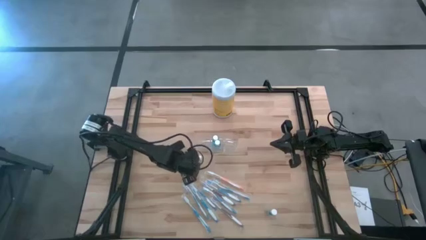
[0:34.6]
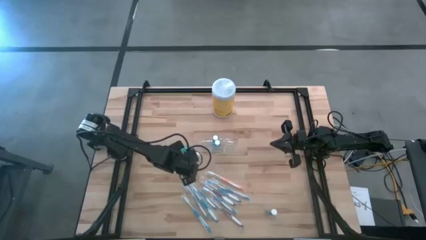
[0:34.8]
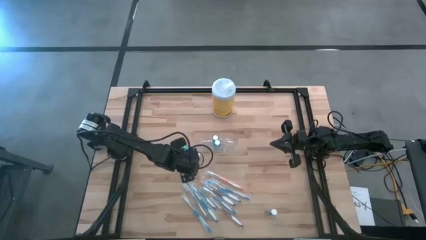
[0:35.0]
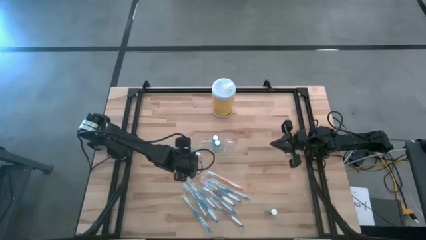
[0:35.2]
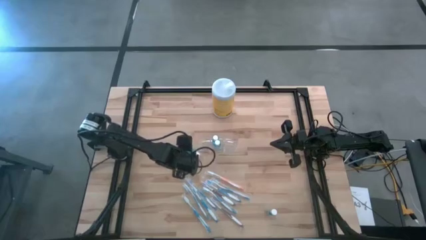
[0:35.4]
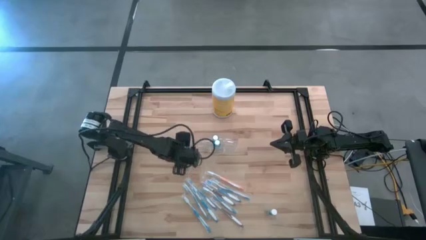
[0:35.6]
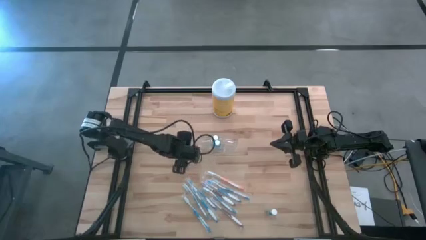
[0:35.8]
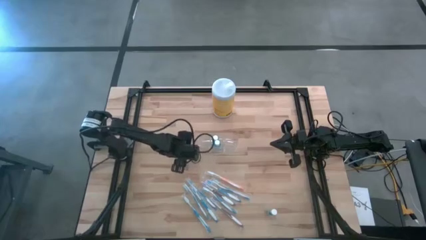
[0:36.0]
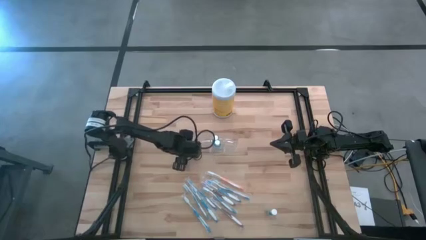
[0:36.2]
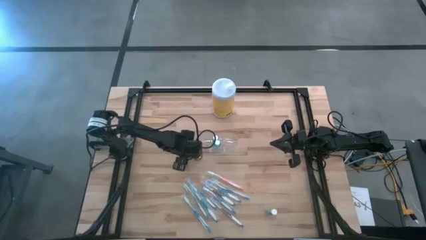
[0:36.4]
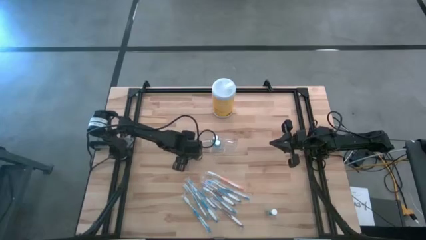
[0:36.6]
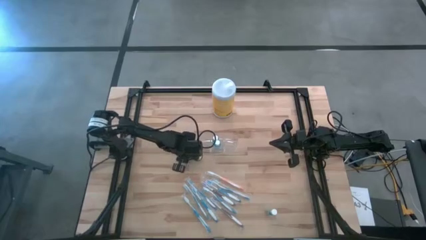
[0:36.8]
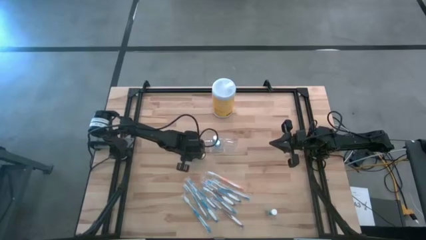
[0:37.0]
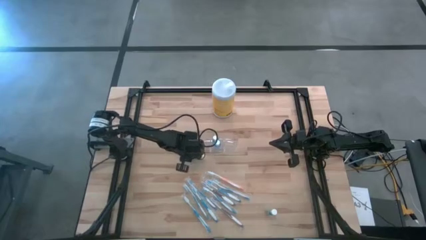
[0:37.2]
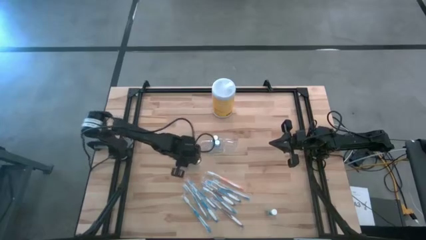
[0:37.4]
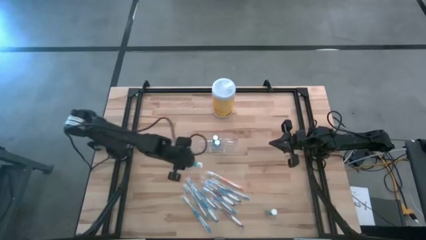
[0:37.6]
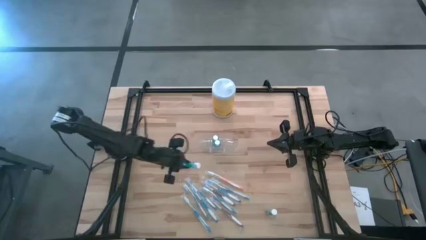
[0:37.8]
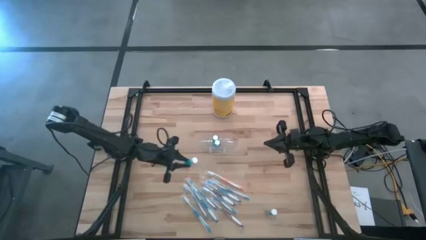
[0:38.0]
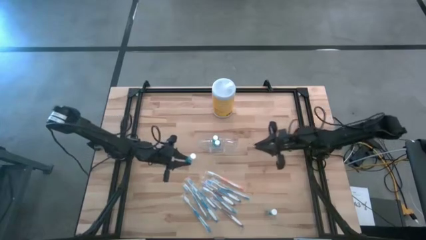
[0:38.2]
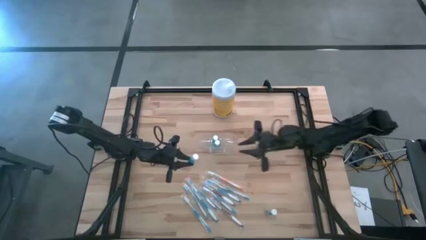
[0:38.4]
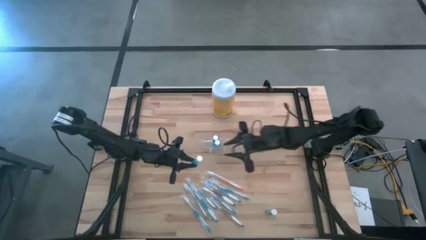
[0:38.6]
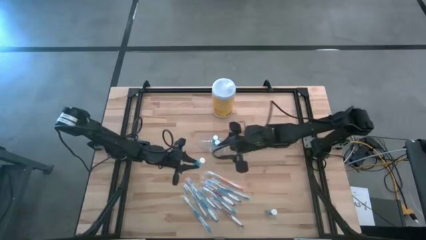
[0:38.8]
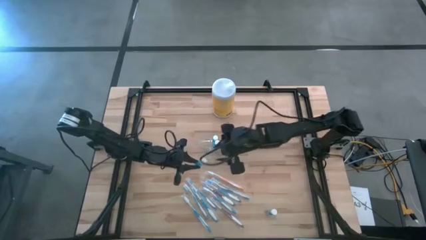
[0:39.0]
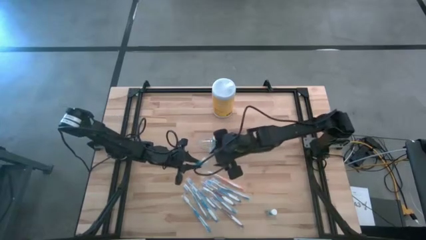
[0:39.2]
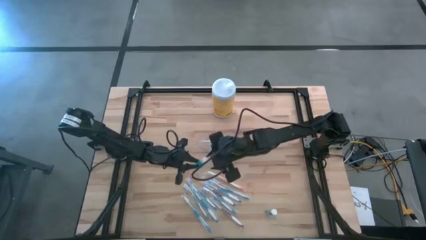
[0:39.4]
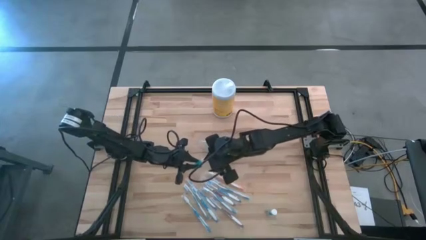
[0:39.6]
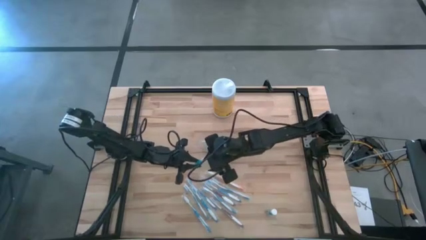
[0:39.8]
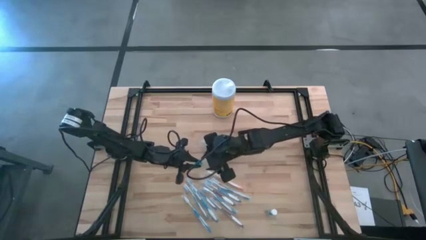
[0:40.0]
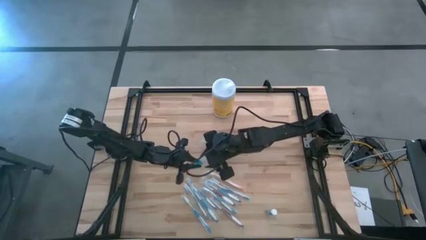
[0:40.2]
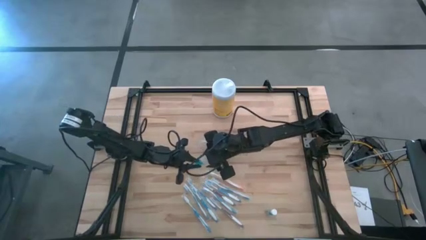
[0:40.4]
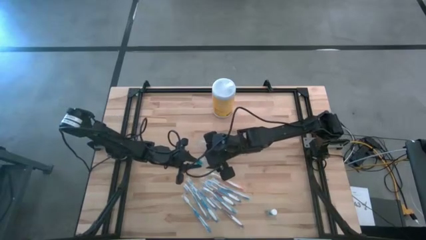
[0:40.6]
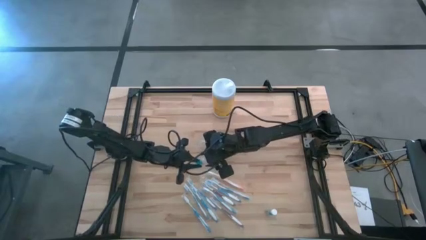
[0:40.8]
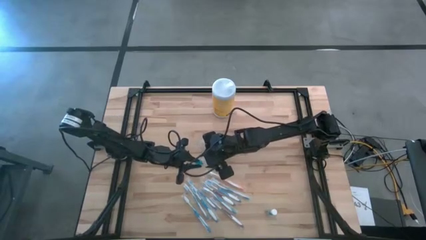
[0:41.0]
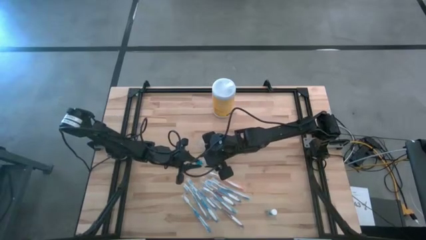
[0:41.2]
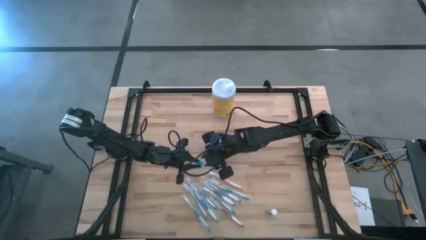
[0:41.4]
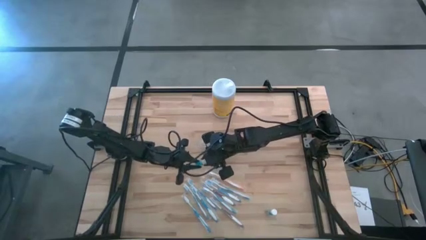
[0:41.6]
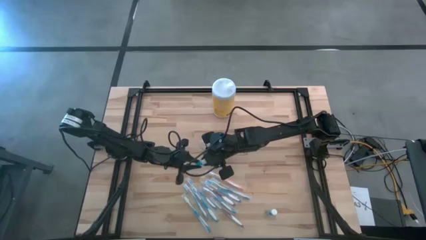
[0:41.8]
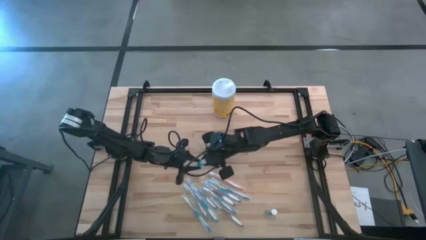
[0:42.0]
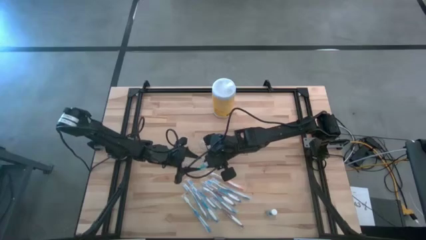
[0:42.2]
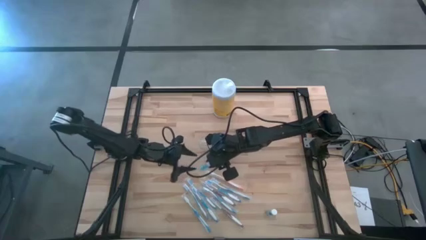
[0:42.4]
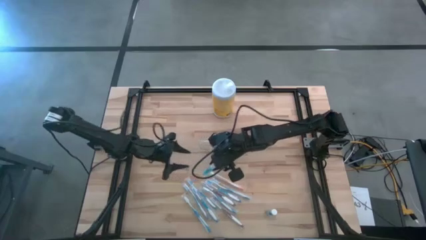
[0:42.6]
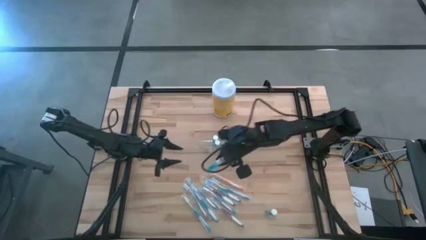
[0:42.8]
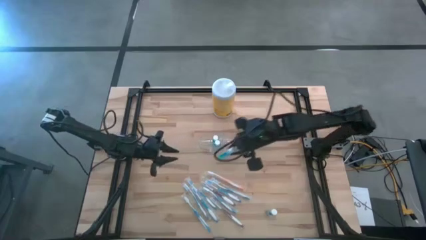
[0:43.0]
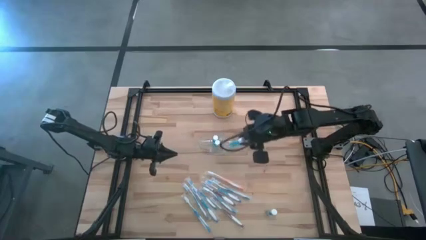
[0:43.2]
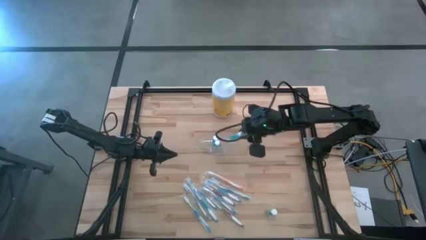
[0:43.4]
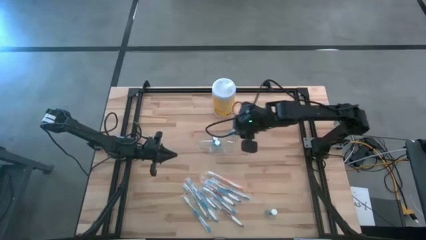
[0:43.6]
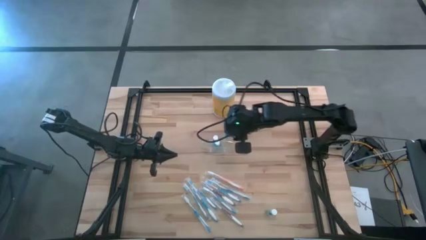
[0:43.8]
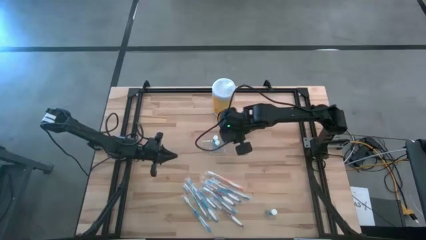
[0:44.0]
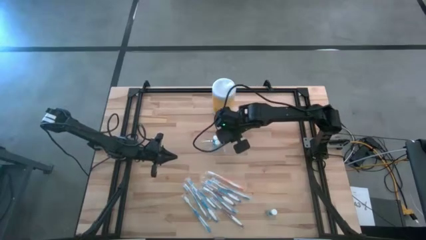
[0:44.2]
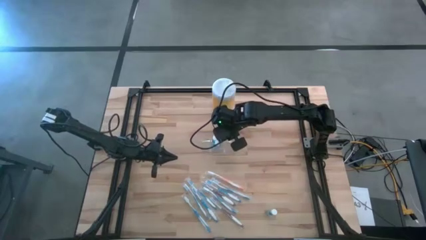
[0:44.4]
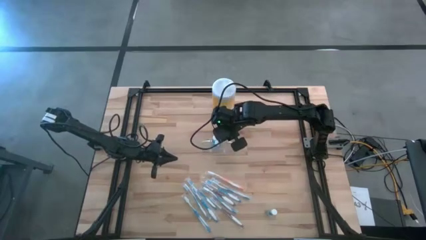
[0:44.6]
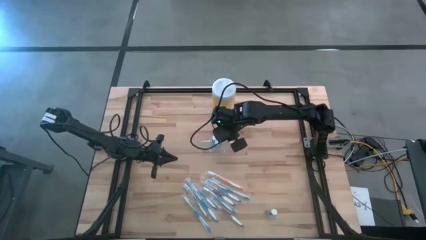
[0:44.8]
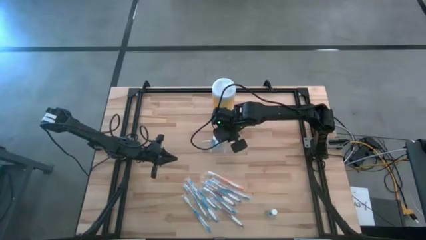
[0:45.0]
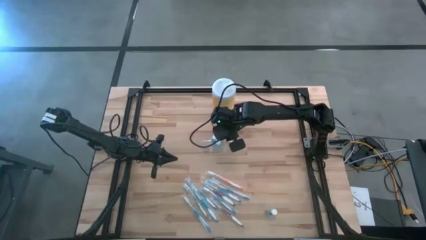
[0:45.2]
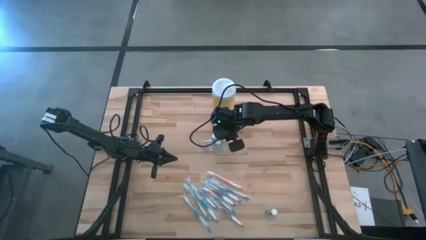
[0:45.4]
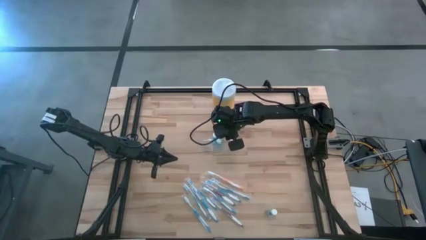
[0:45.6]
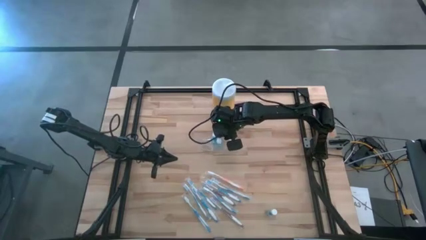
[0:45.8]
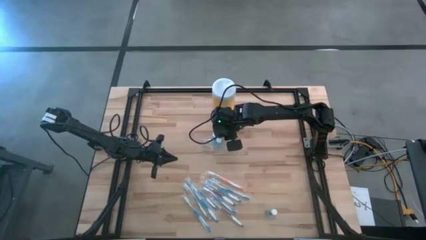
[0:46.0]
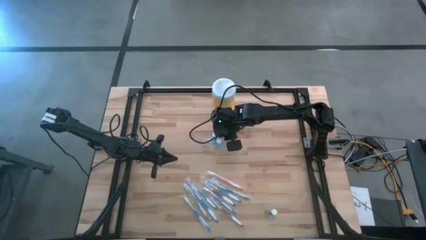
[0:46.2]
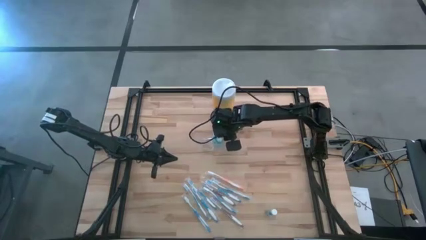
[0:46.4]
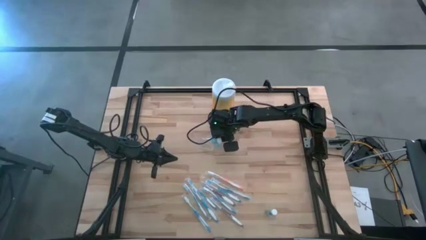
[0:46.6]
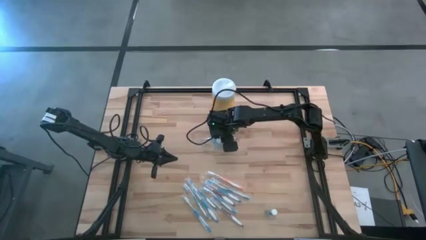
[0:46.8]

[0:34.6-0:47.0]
Task: Pick & Place toothbrushing station
Put the mouthwash into the transparent organizer
